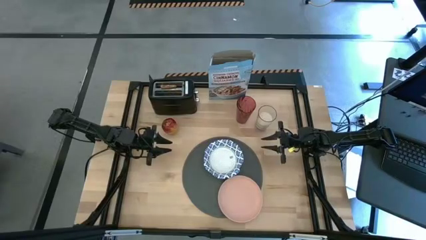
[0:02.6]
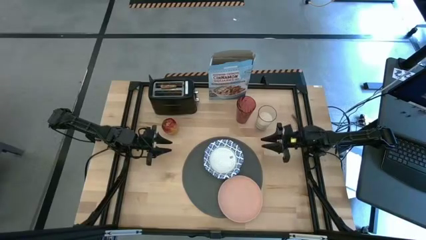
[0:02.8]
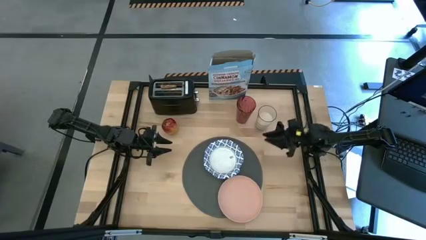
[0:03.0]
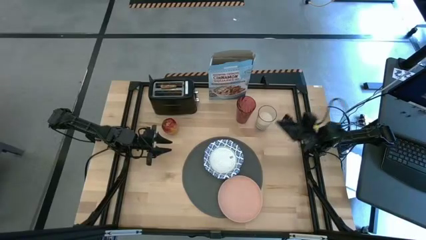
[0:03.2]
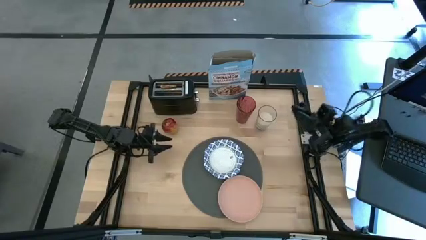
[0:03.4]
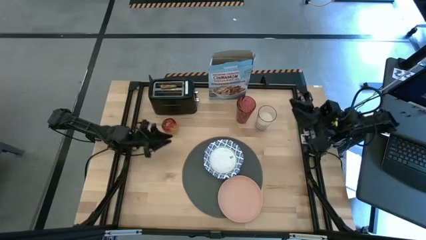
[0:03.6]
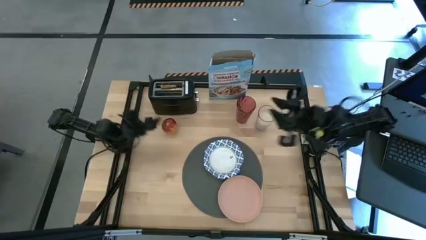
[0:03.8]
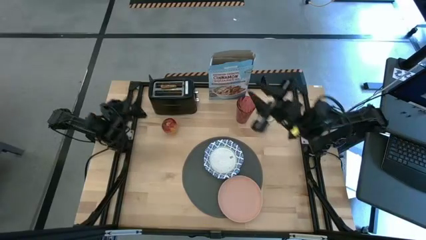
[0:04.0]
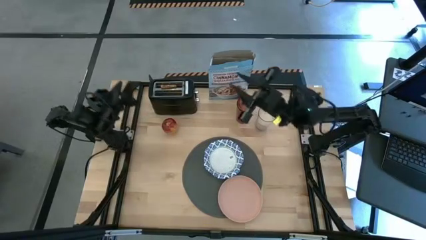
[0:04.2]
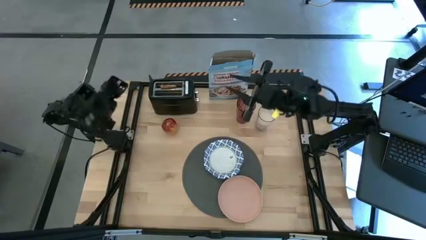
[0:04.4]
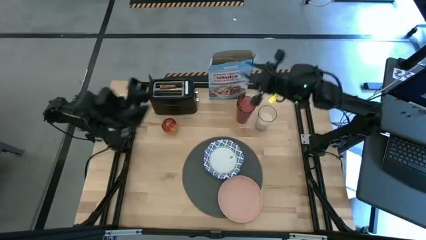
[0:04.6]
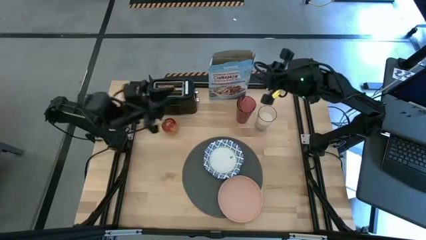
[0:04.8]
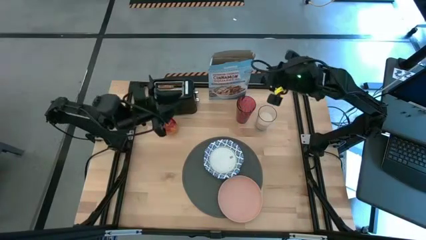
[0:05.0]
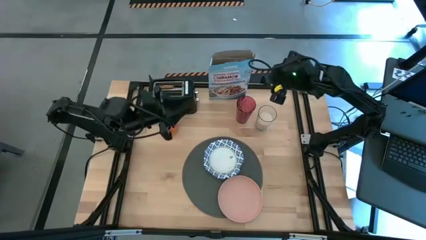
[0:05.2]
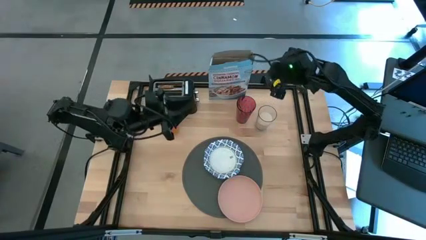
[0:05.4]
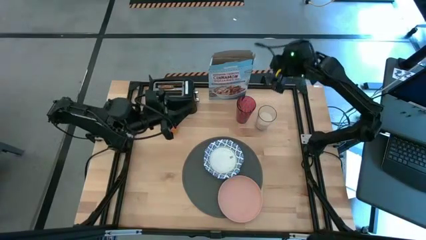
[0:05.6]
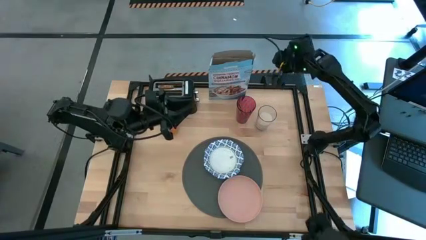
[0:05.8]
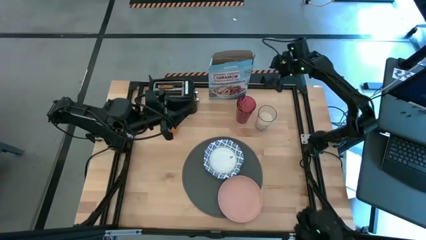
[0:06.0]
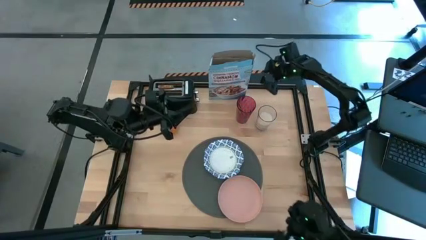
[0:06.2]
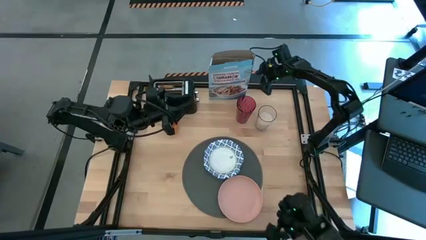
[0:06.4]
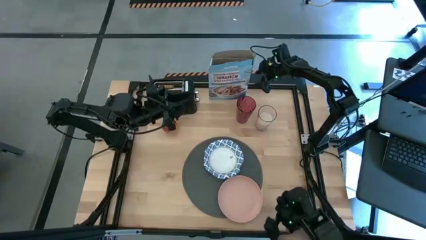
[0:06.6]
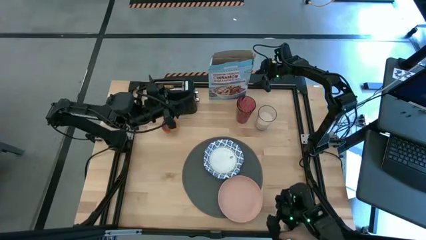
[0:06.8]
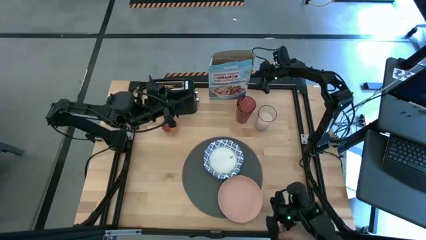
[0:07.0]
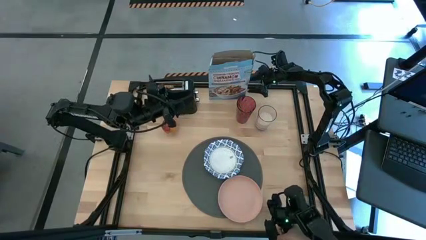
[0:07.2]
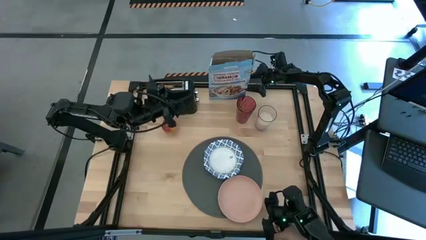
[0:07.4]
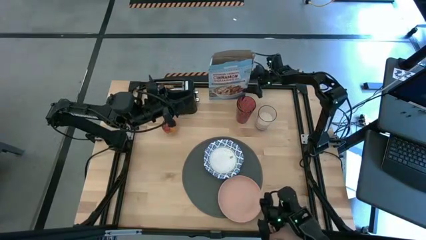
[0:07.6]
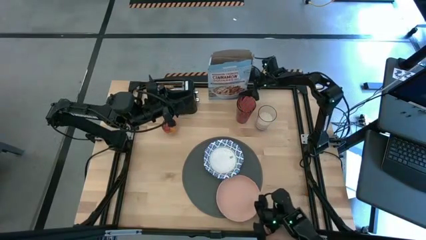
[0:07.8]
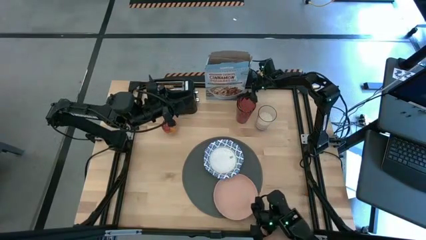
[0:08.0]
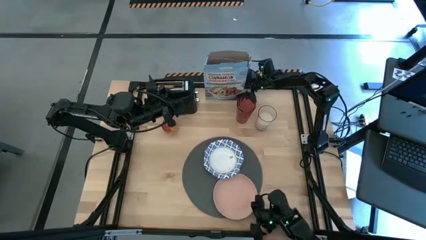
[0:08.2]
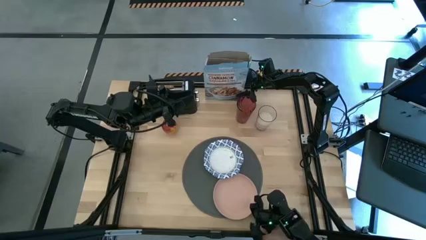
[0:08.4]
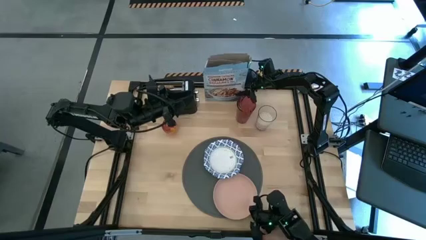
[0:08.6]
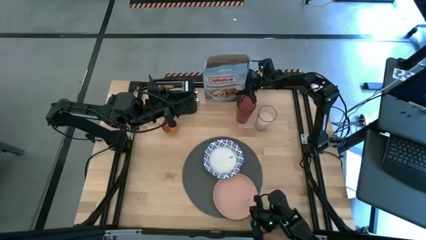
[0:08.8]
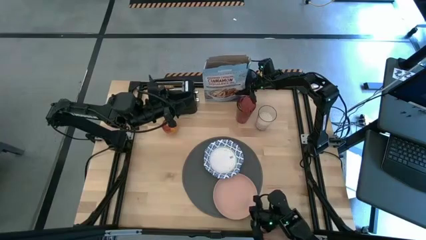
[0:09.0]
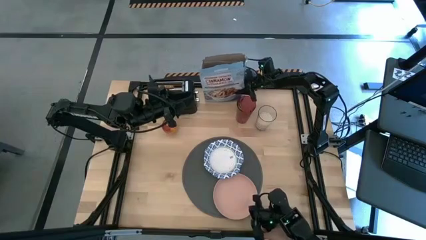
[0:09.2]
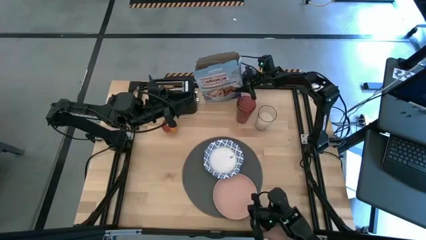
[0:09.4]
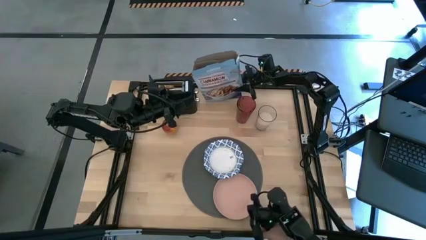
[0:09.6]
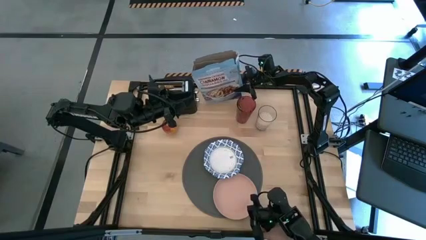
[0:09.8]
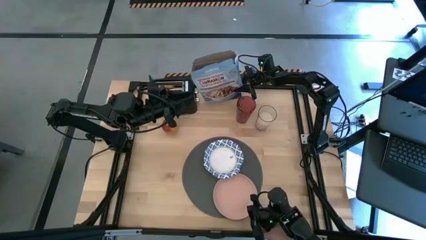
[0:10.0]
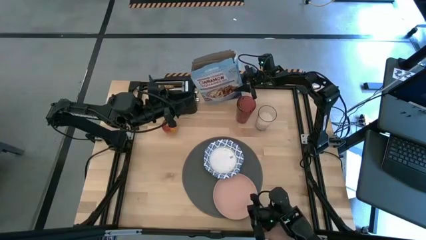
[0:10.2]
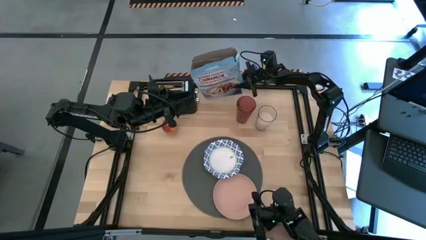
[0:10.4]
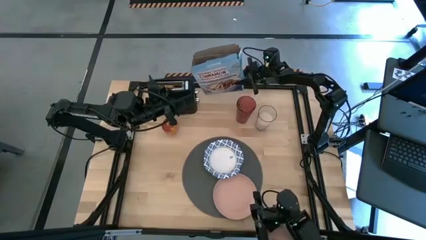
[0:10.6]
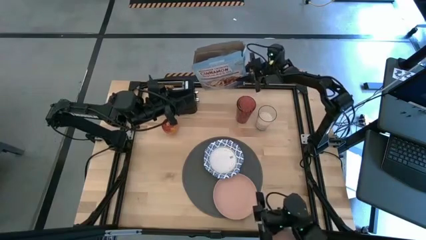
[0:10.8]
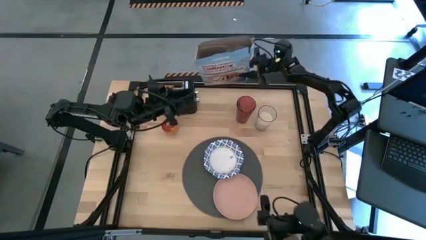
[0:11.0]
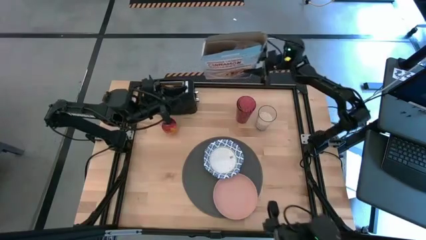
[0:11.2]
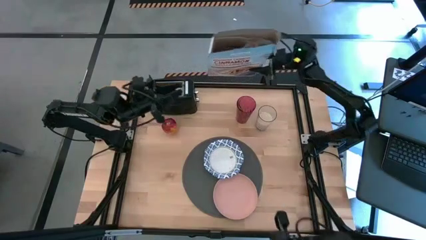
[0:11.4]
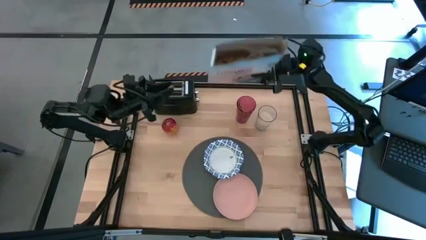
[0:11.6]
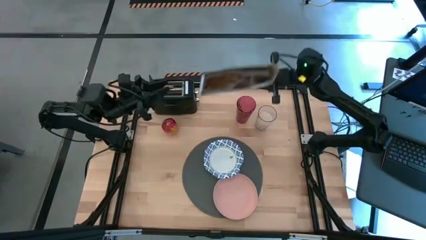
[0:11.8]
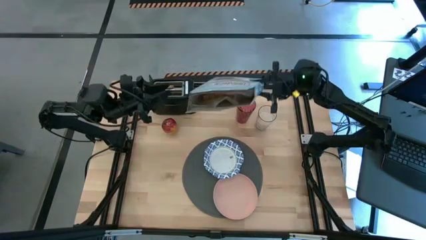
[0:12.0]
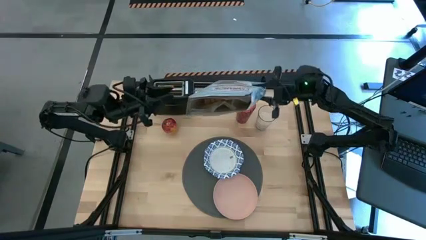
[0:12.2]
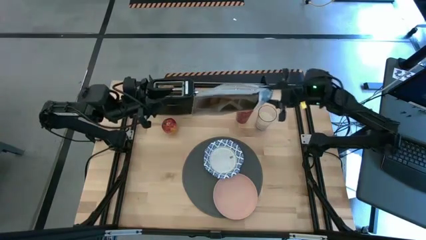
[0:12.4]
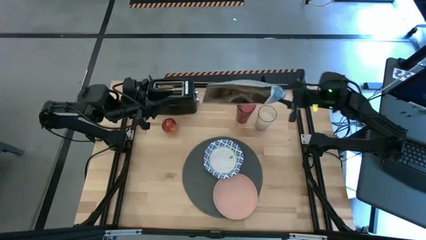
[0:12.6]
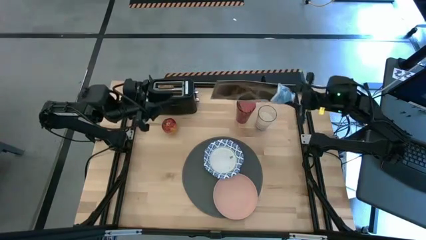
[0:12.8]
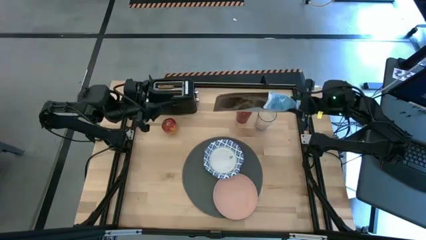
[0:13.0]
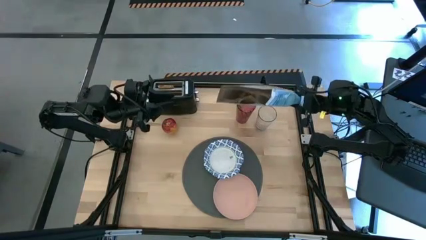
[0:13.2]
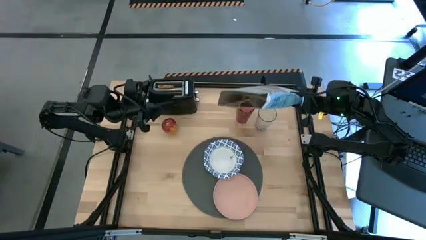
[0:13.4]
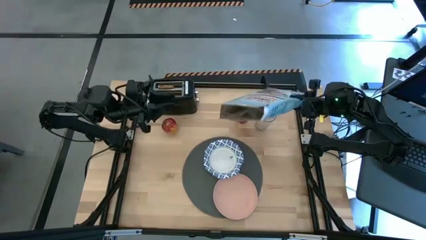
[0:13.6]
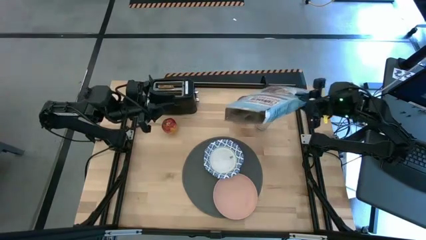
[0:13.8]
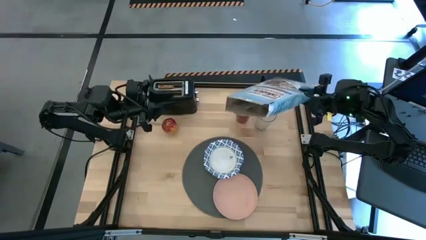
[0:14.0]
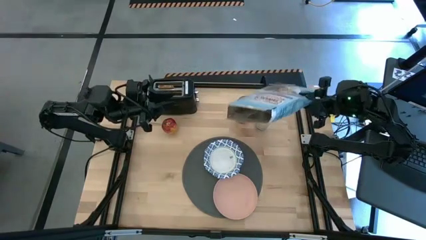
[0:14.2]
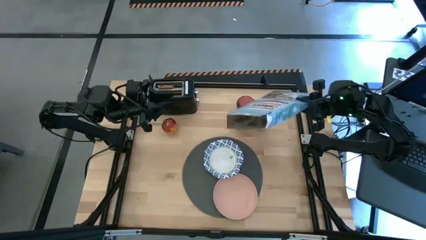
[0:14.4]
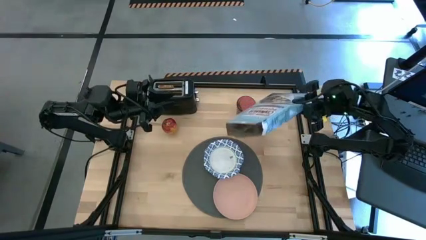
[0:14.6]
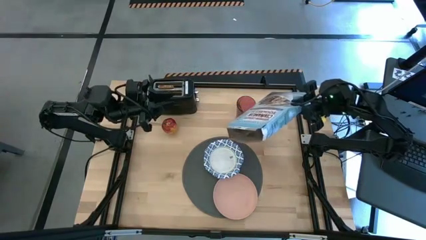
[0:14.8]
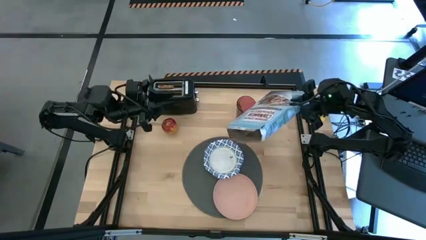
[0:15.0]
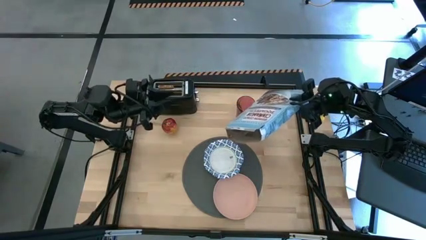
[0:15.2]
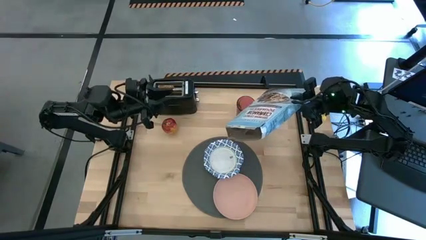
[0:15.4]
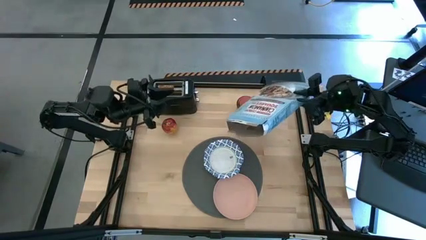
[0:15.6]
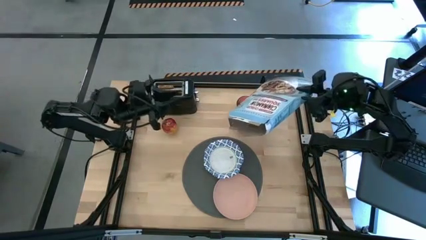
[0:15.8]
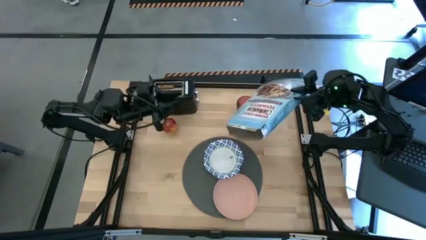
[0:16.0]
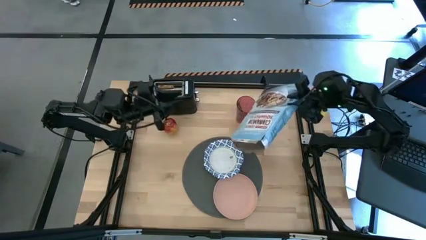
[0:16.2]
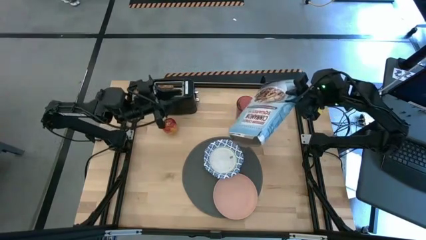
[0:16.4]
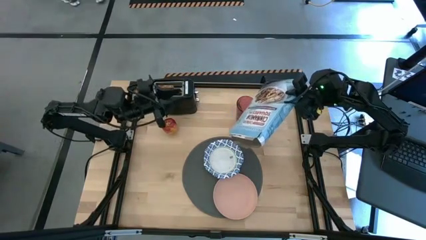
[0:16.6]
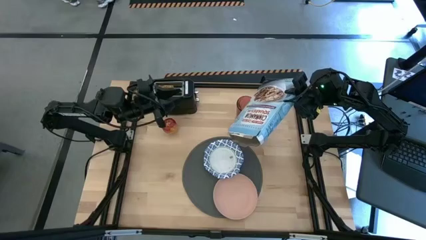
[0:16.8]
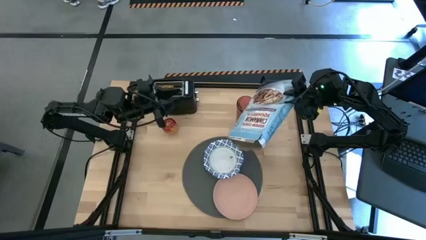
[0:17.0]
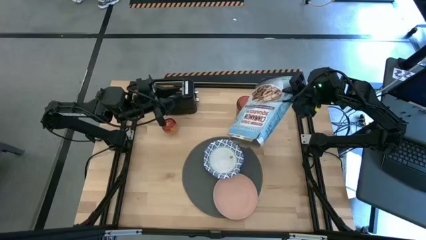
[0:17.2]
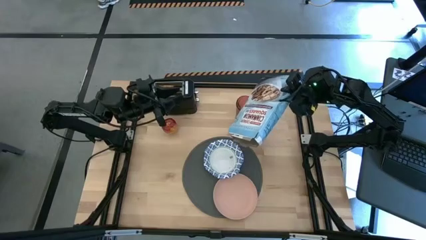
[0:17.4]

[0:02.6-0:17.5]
Task: Arrange a breakfast setting
Pour the cereal from the cereal box into the blue patterned bowl
